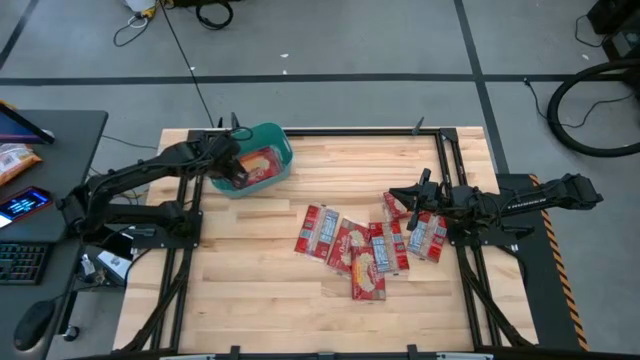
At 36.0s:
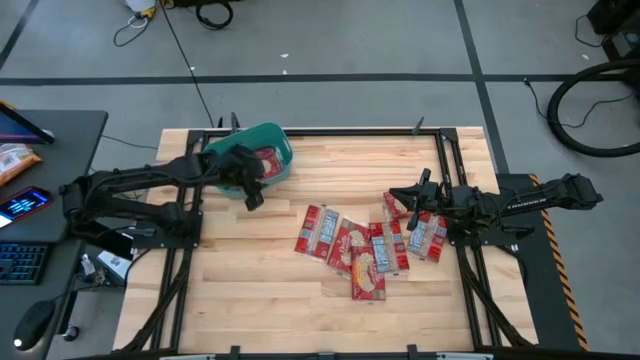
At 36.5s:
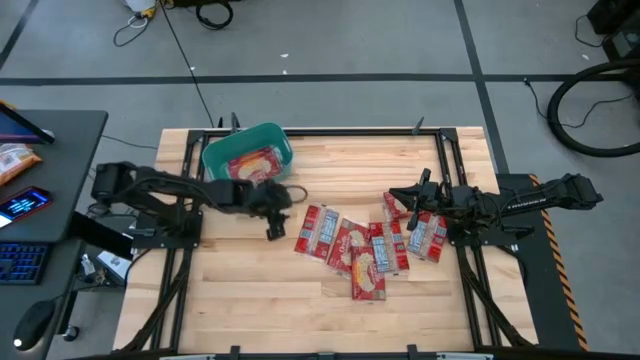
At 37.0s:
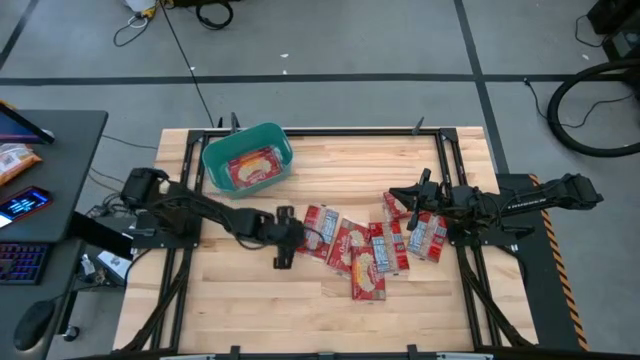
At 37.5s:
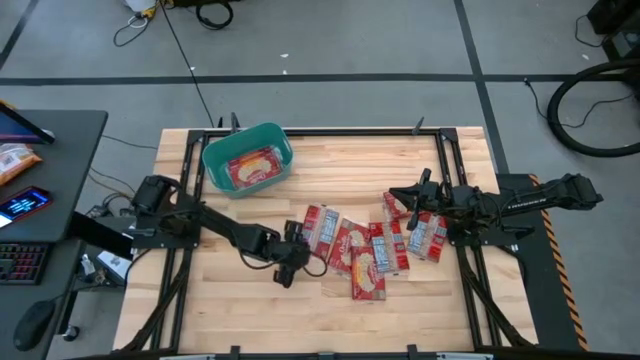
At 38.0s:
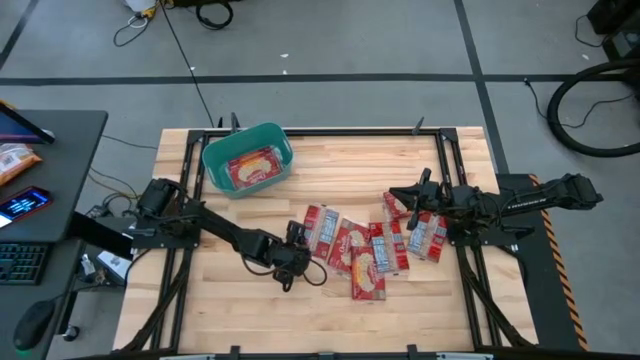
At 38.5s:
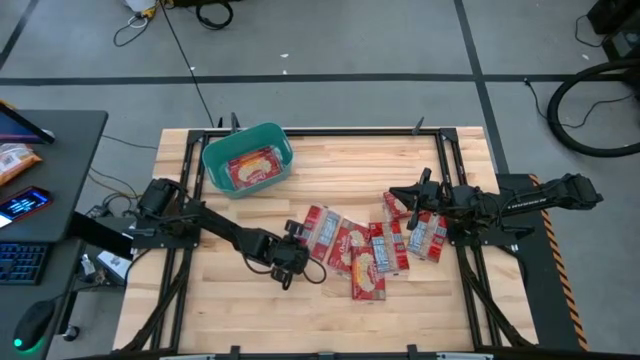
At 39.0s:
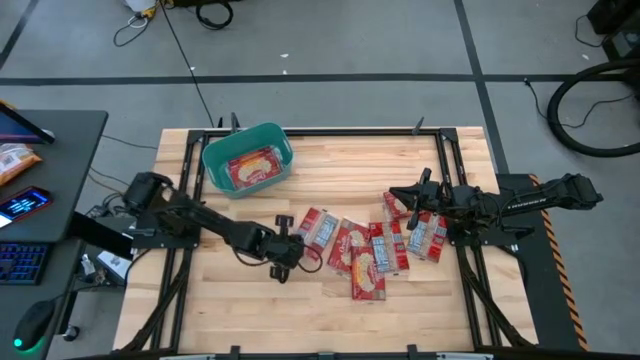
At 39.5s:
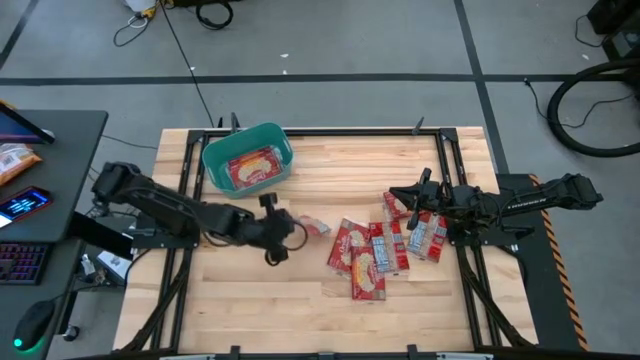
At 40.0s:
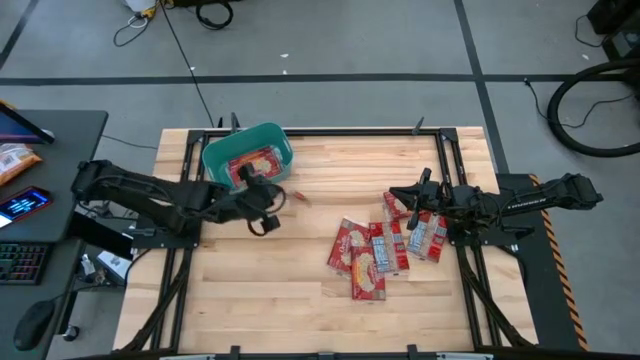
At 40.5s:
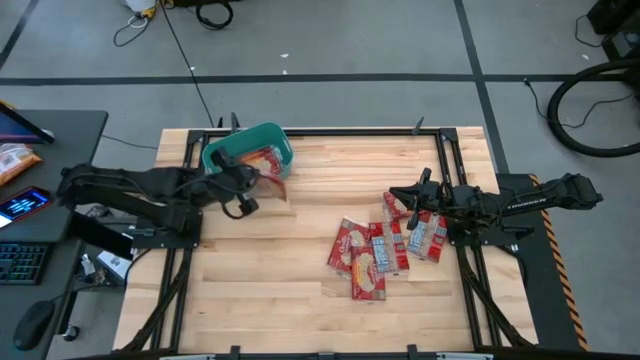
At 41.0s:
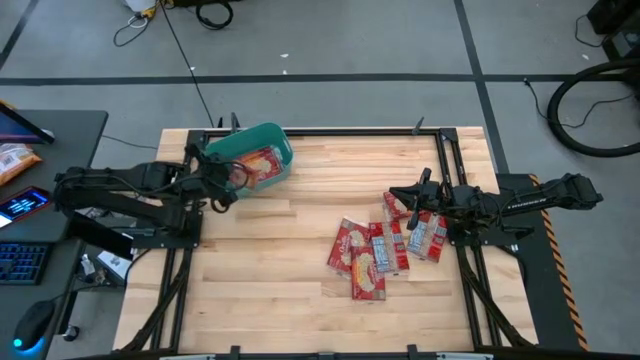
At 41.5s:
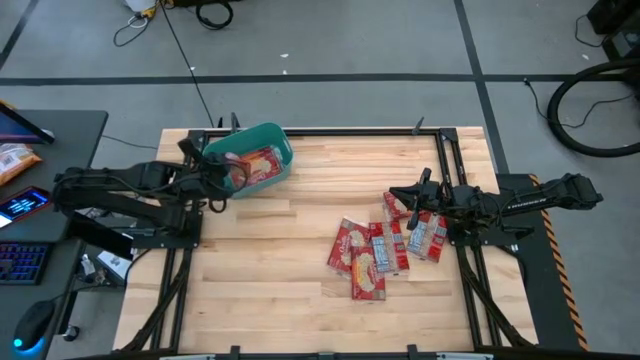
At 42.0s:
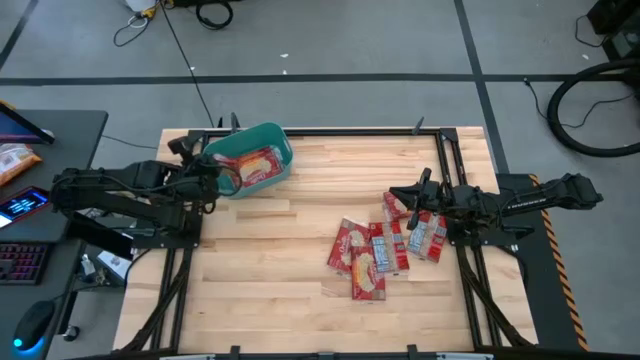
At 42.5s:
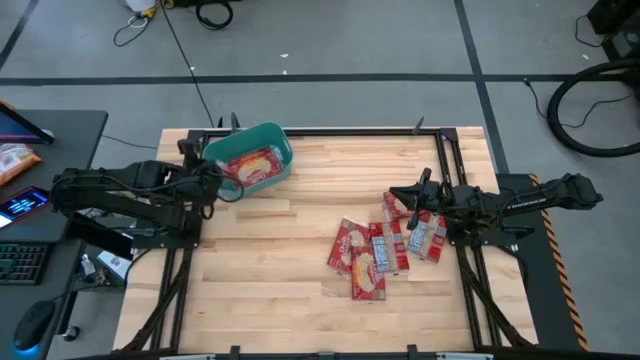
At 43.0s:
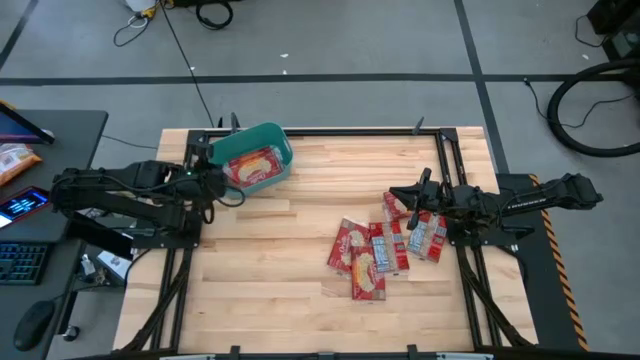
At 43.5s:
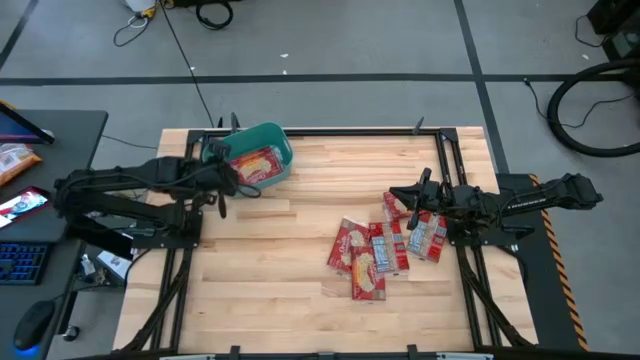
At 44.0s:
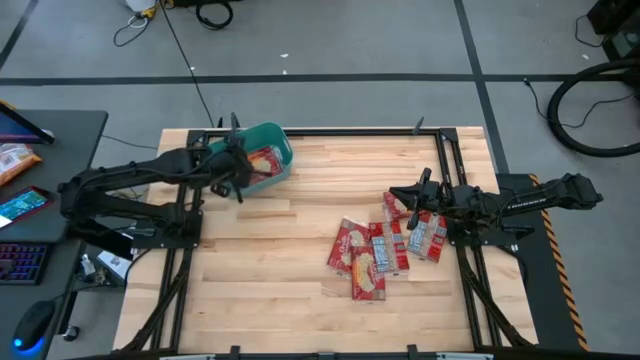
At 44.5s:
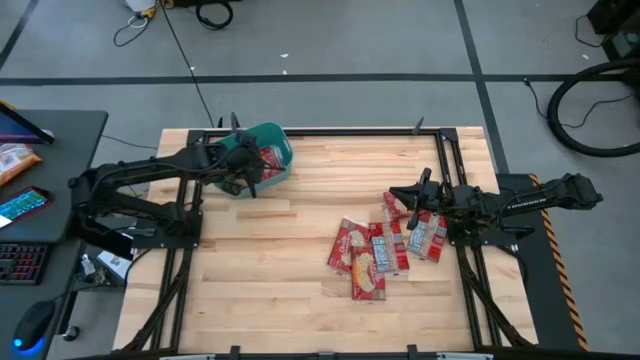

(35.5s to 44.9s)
Task: Sort popcorn bags into baskets
Put the red popcorn bag into the green bin

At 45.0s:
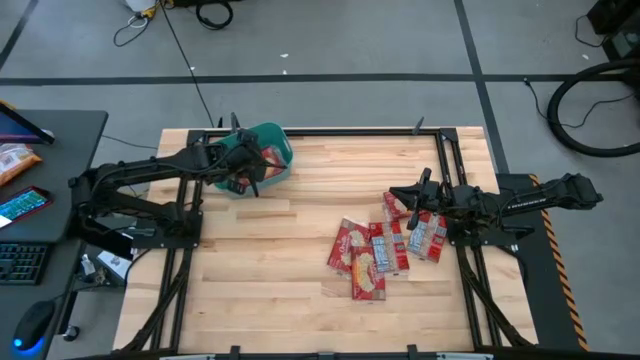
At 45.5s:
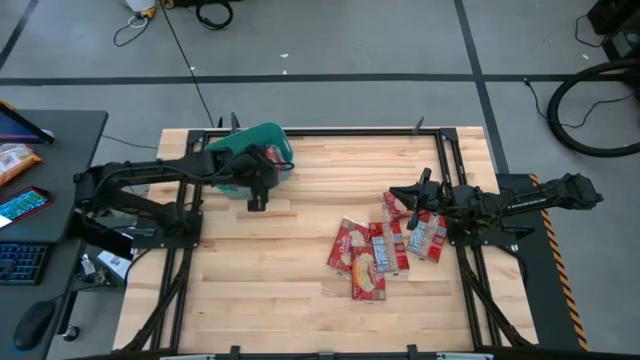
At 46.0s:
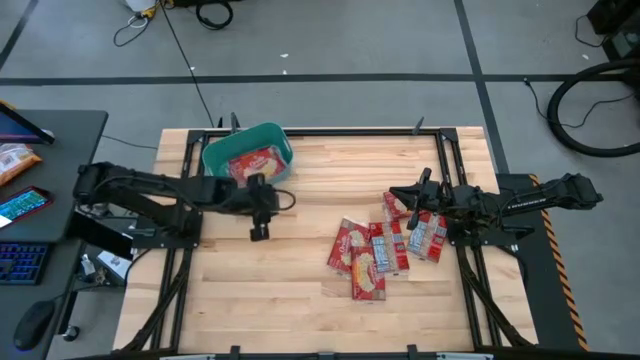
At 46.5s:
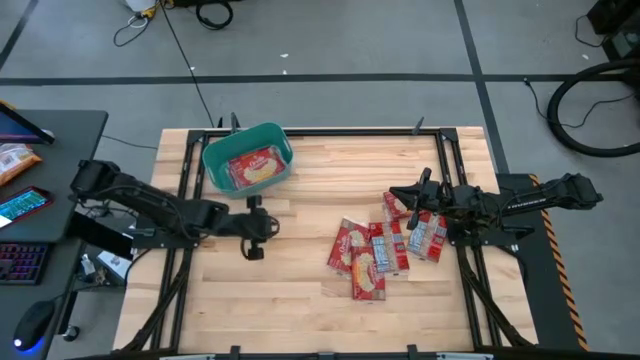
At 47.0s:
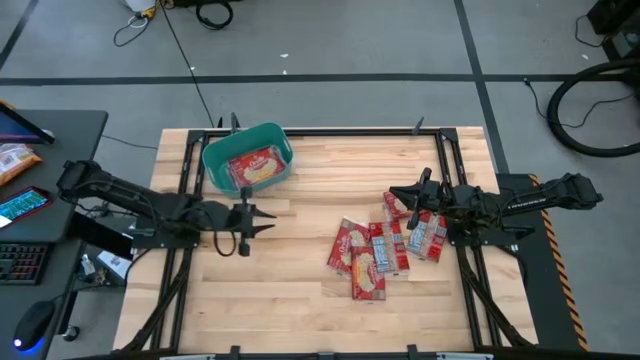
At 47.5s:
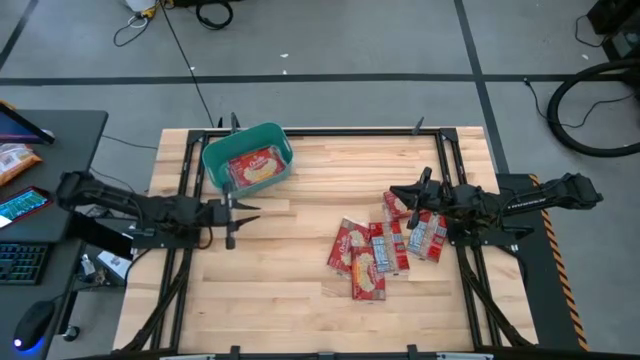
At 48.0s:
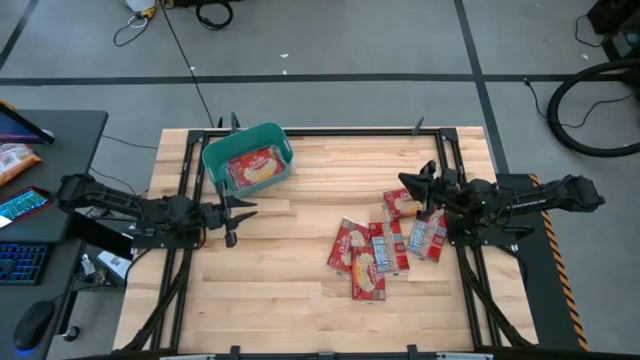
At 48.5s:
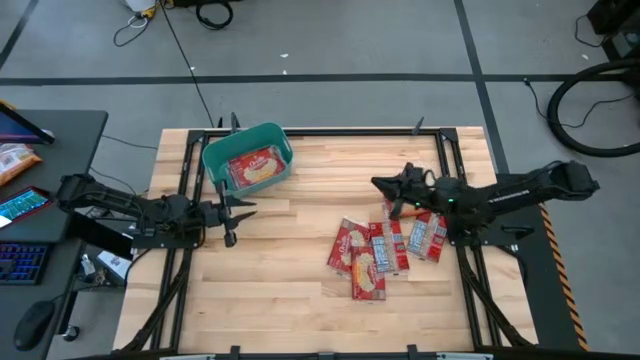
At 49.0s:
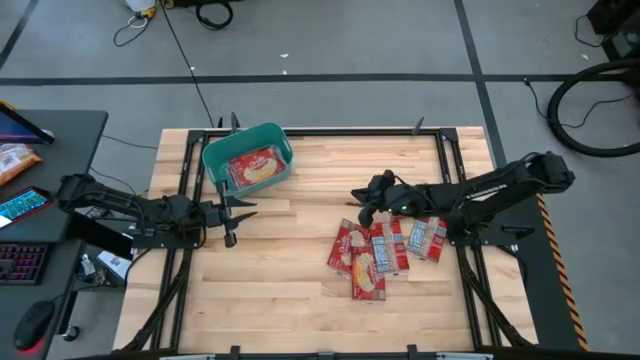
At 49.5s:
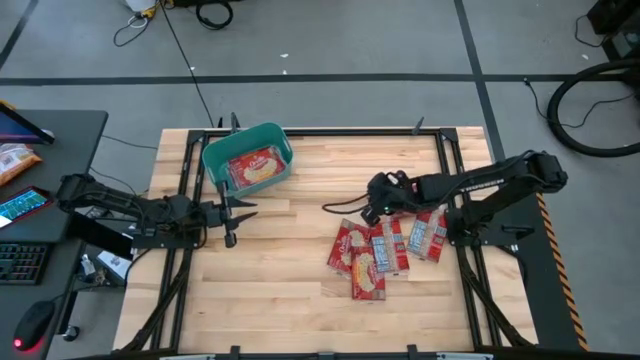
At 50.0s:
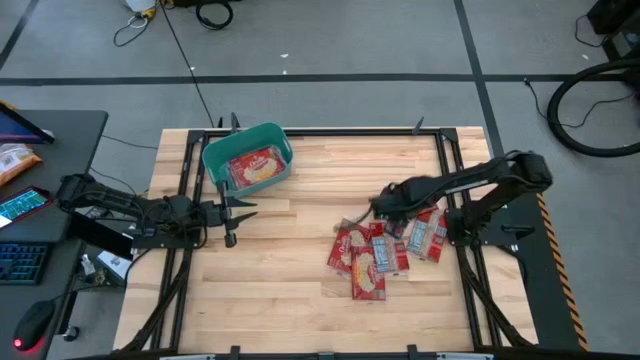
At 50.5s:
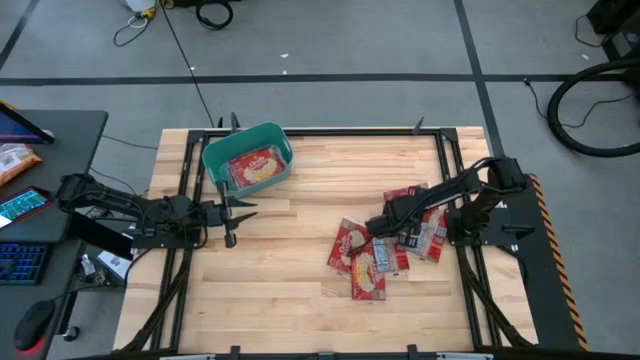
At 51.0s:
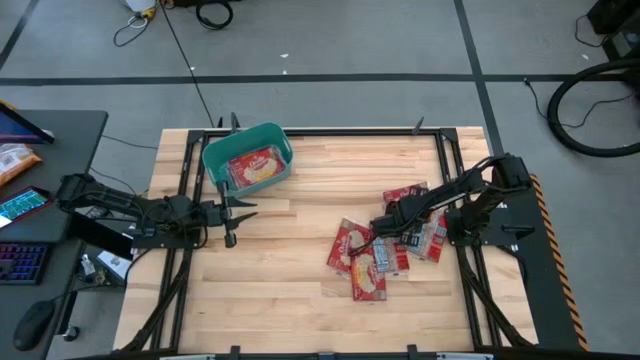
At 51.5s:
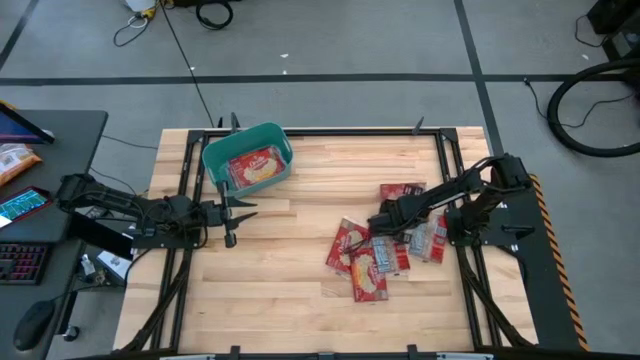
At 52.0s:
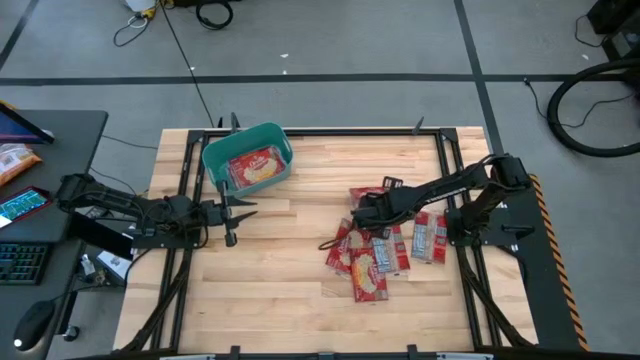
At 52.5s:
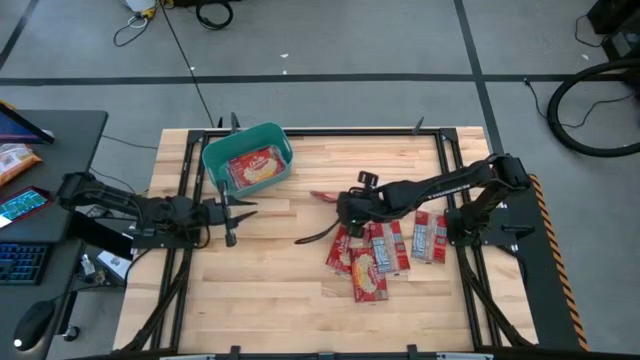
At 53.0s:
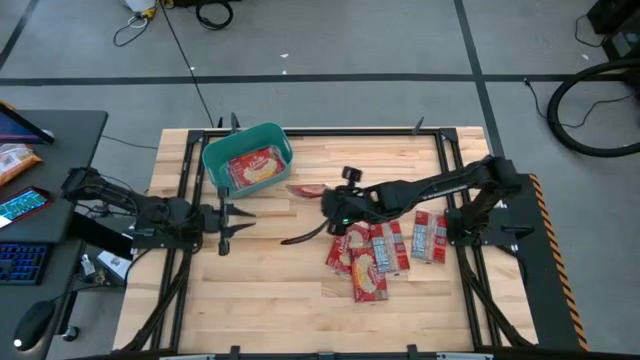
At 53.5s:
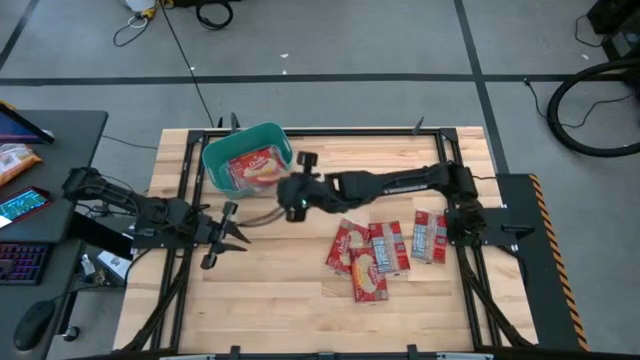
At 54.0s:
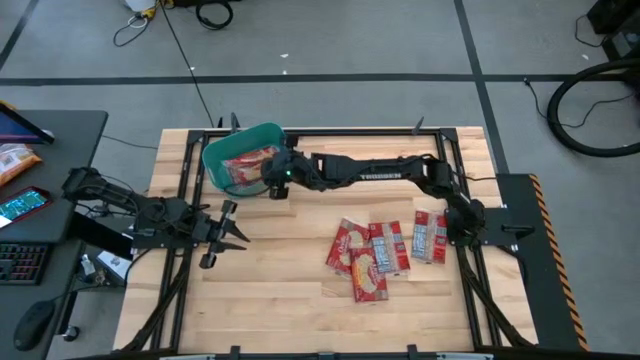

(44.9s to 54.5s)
Put the red popcorn bag into the green bin

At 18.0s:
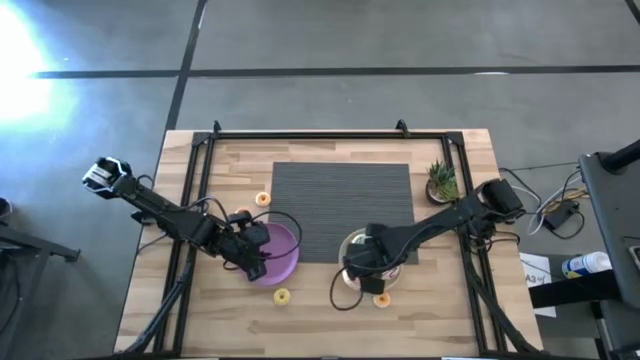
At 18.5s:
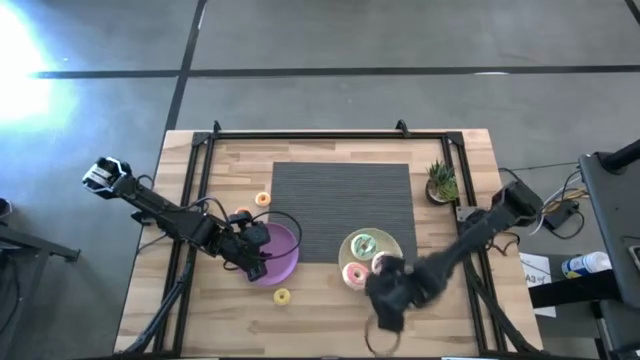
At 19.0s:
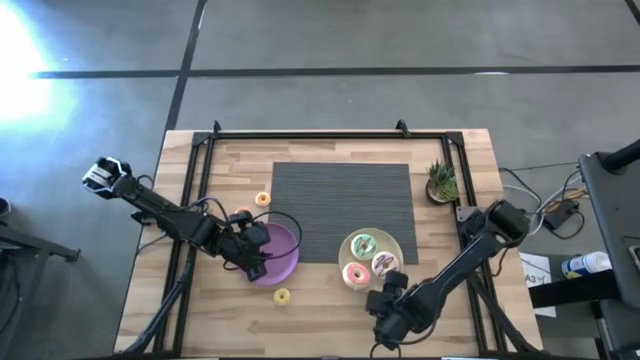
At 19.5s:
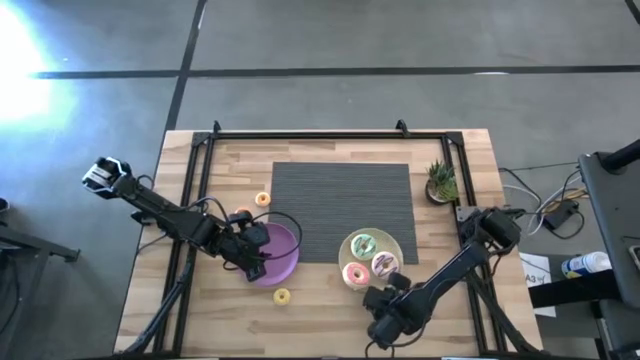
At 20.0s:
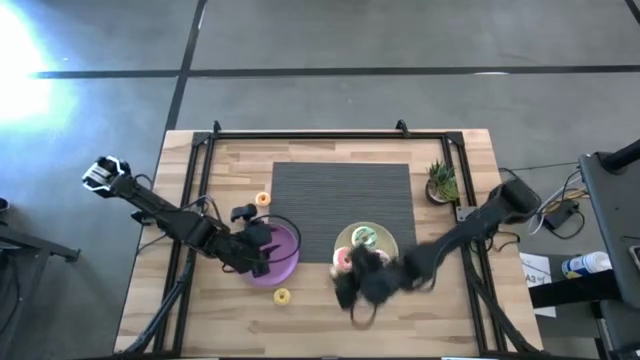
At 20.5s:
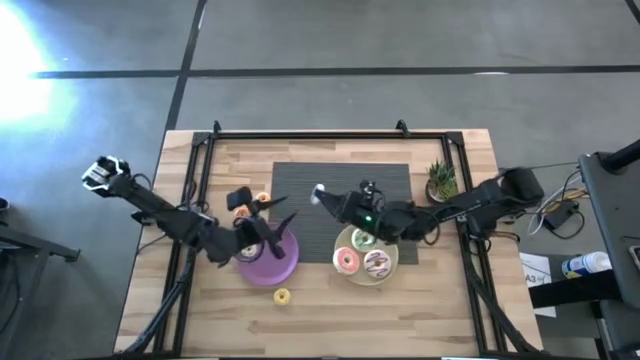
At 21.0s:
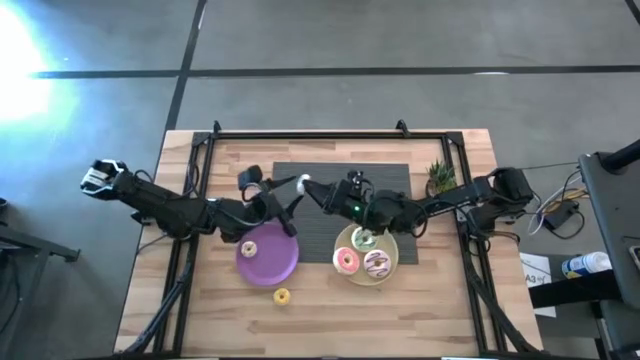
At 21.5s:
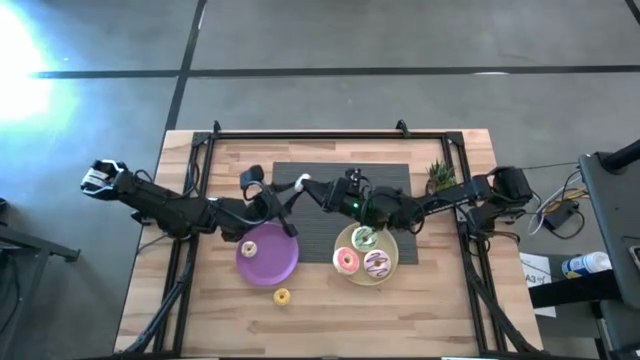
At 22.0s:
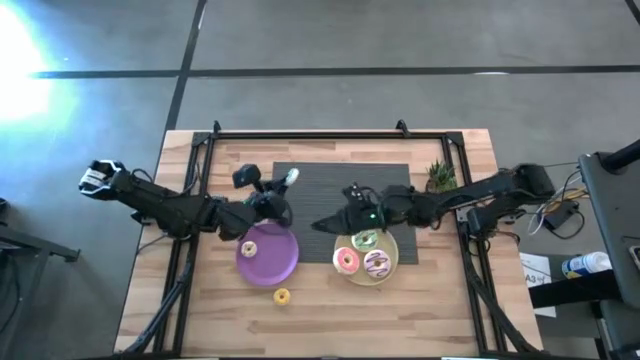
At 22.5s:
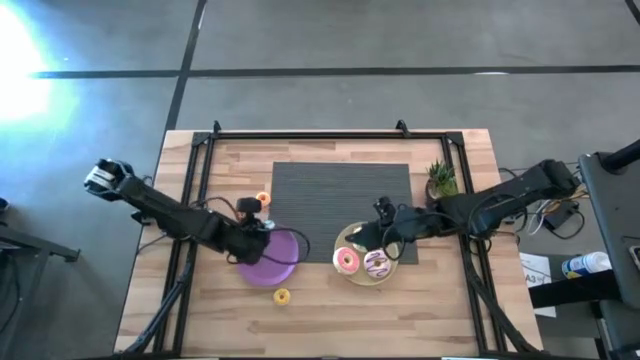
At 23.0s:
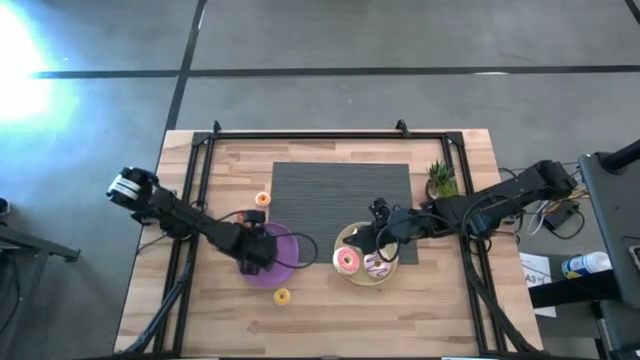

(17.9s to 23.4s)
Task: Pick & Place donuts
Put the small blue donut on the violet plate
